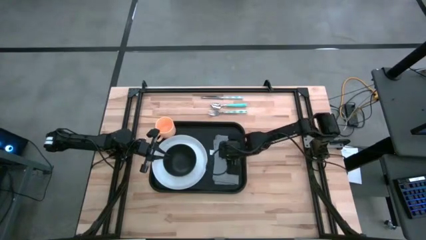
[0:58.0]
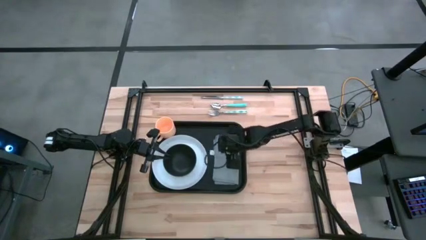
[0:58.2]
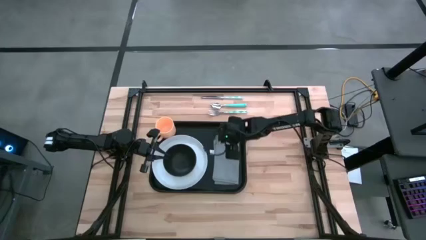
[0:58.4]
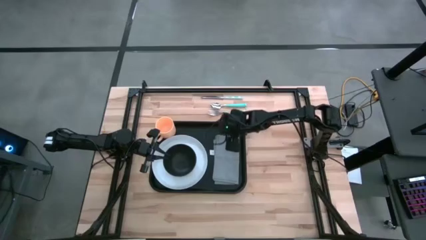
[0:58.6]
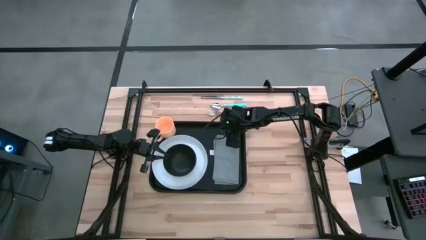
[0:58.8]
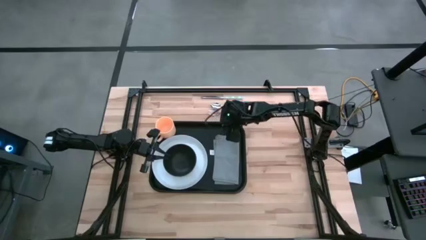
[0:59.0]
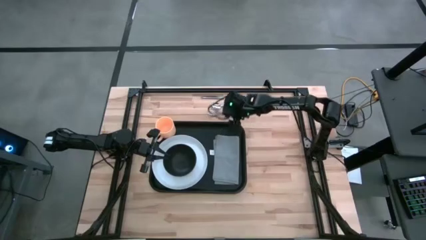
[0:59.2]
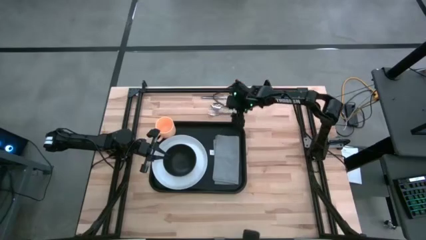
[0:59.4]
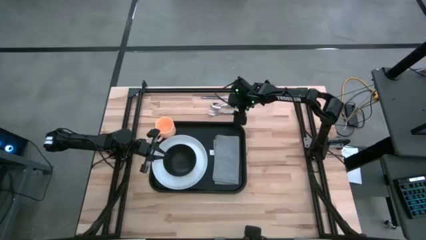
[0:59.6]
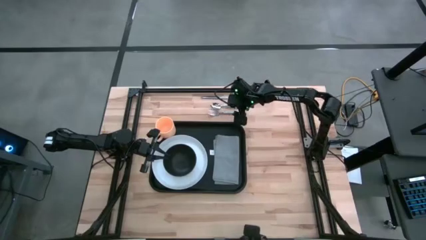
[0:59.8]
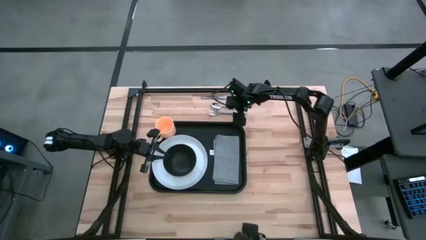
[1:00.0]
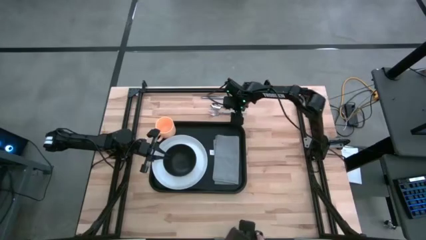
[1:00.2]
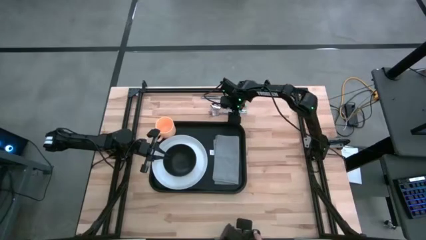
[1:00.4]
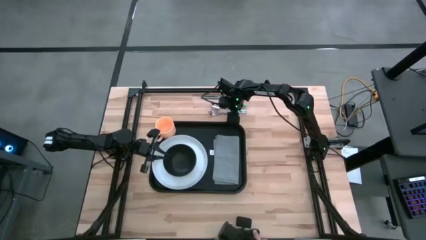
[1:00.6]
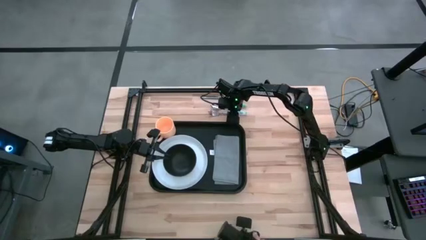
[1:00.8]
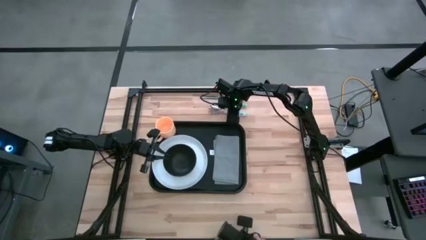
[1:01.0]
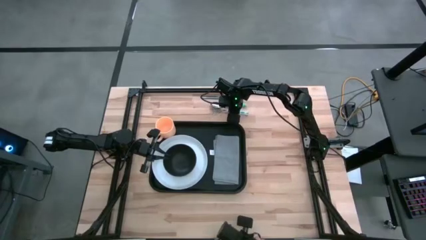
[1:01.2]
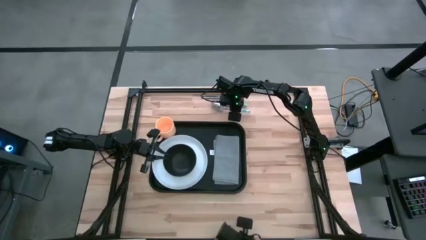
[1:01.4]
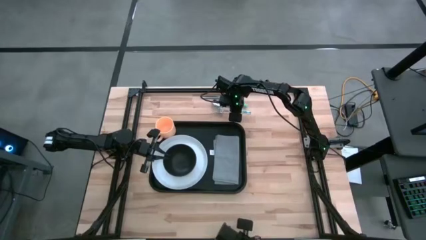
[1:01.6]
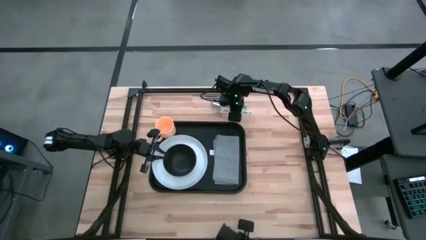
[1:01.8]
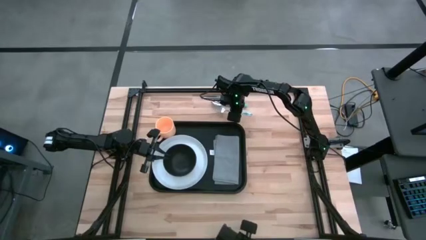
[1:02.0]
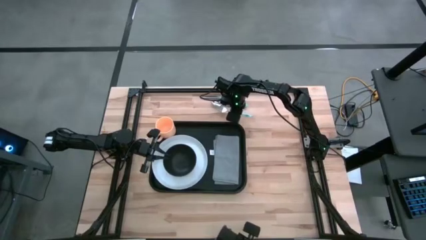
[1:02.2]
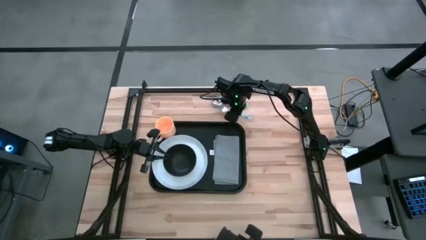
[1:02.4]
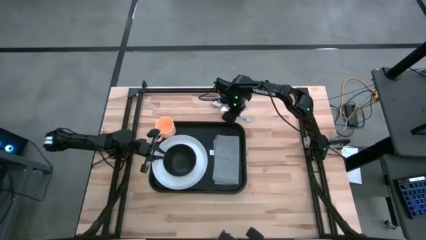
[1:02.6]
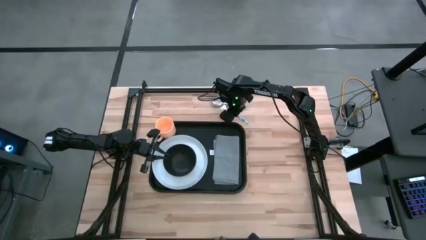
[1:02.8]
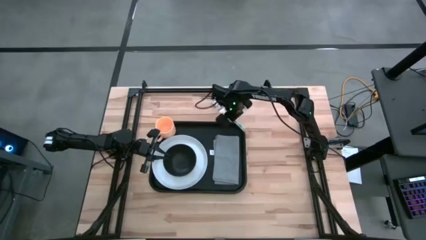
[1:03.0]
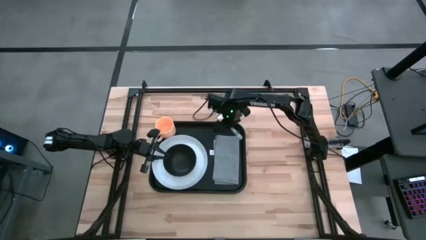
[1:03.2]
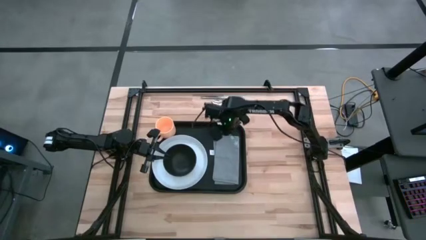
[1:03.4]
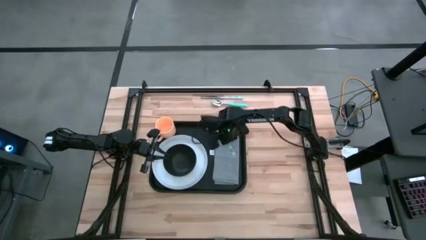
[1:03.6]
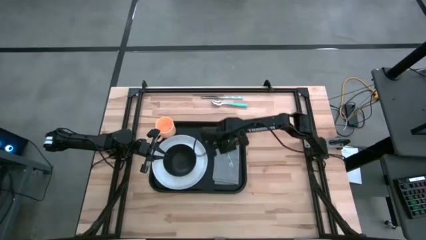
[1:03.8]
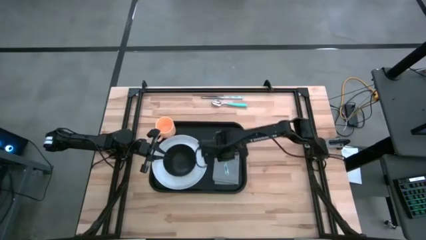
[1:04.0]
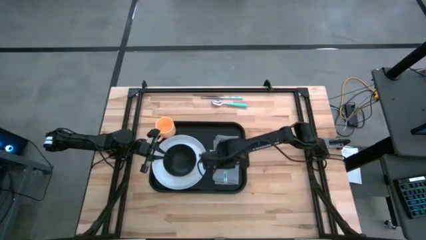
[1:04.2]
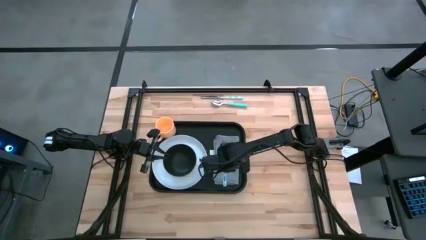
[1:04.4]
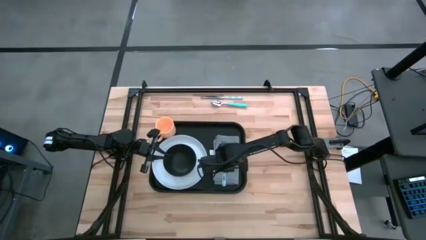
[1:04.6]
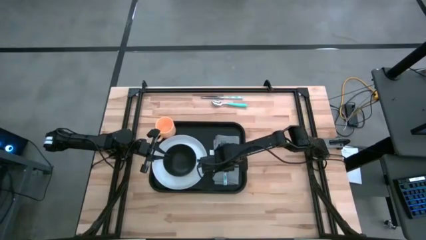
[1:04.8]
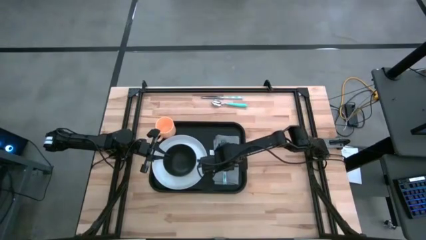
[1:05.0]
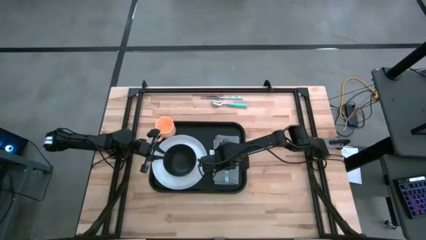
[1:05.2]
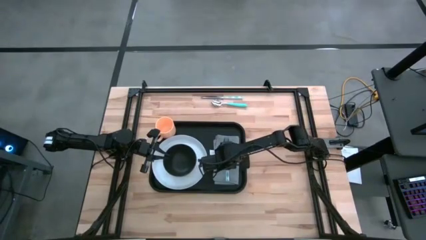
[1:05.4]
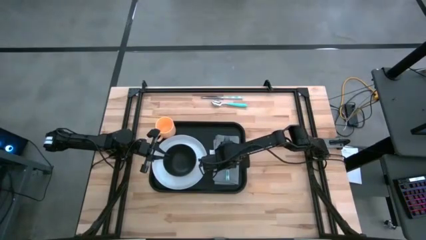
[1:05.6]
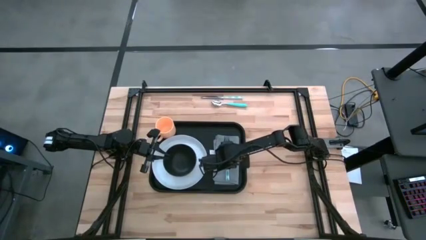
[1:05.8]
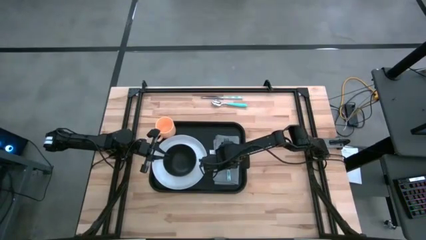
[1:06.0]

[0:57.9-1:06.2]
Task: Set up tray
Put the white fork on the gray napkin on the black tray

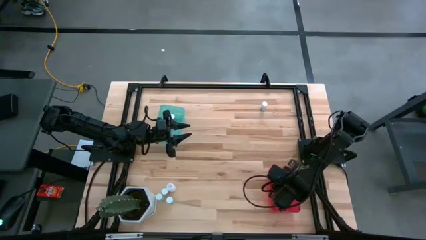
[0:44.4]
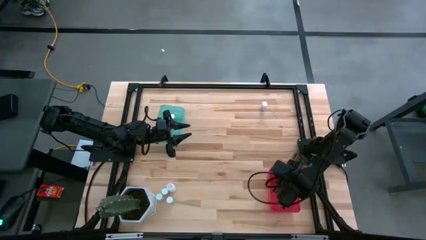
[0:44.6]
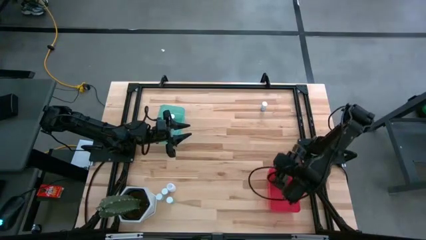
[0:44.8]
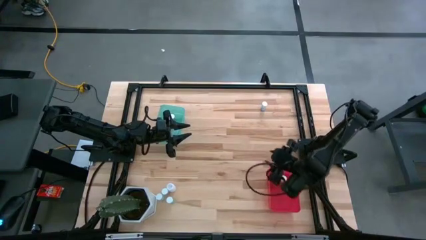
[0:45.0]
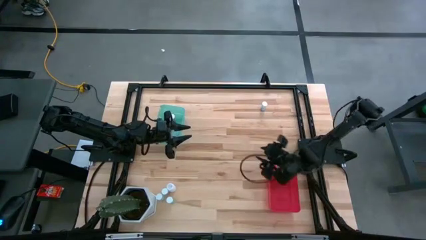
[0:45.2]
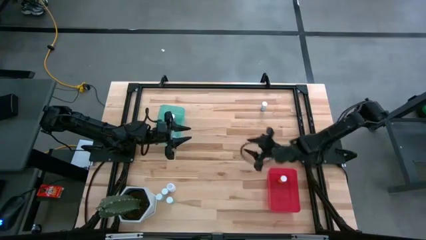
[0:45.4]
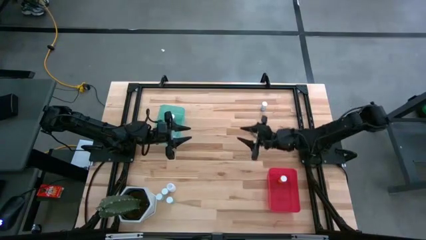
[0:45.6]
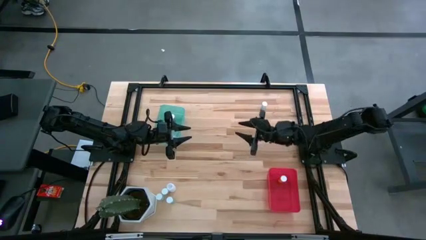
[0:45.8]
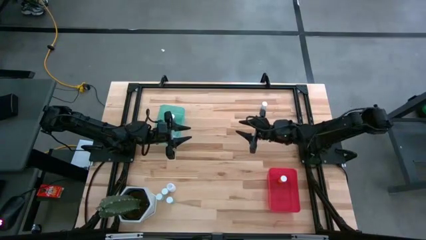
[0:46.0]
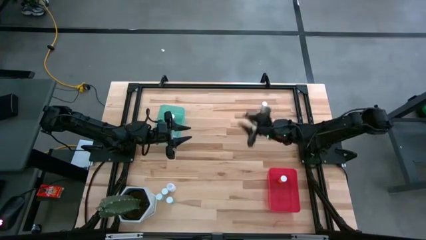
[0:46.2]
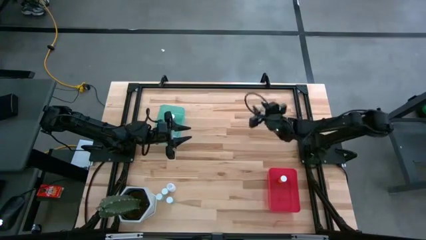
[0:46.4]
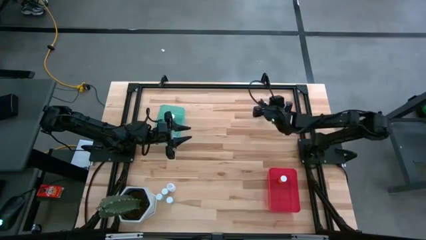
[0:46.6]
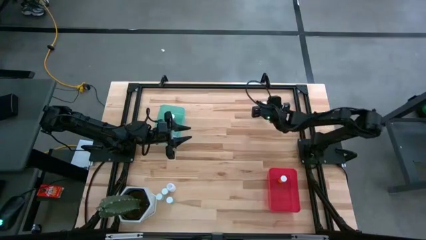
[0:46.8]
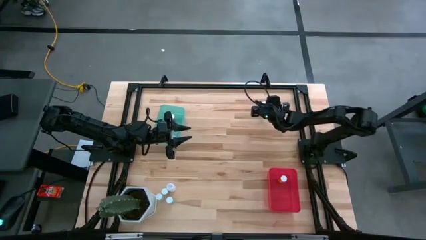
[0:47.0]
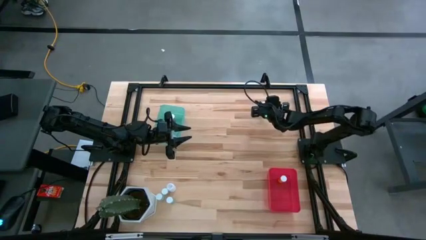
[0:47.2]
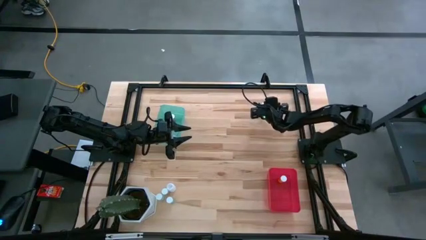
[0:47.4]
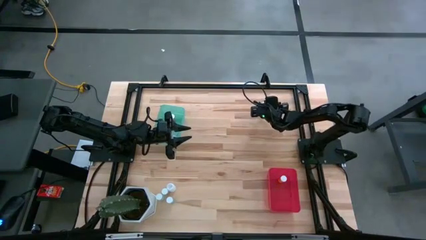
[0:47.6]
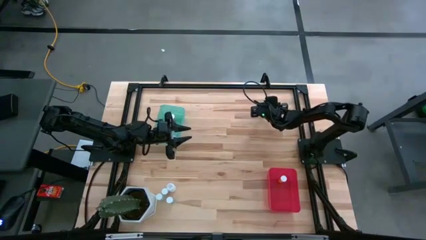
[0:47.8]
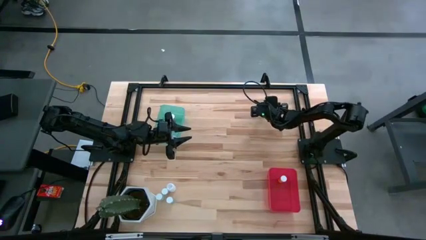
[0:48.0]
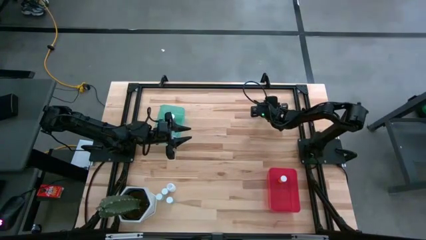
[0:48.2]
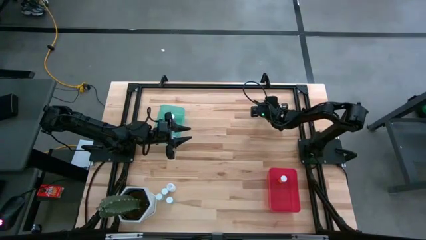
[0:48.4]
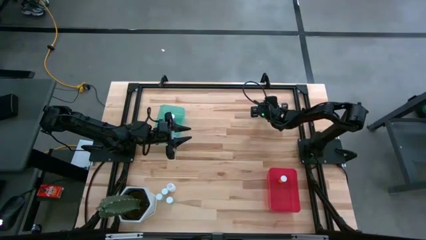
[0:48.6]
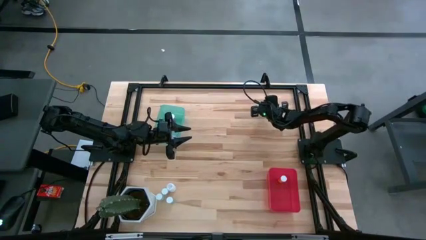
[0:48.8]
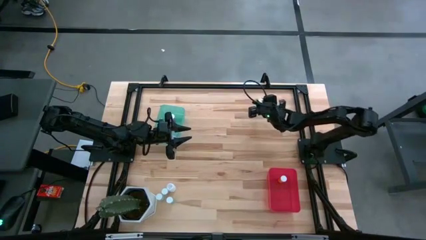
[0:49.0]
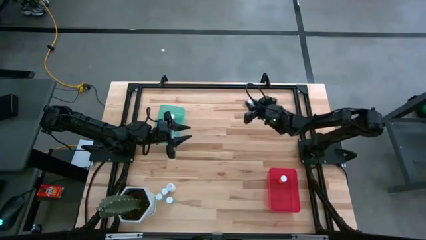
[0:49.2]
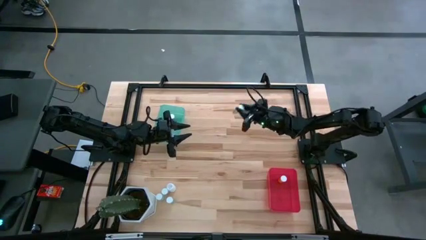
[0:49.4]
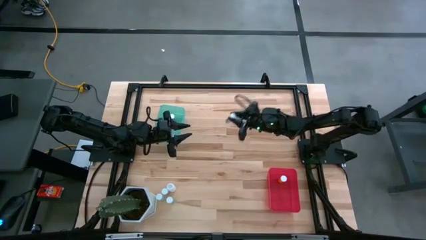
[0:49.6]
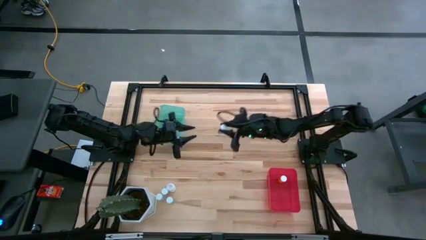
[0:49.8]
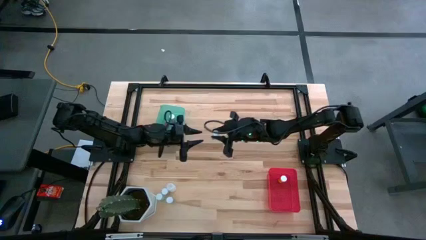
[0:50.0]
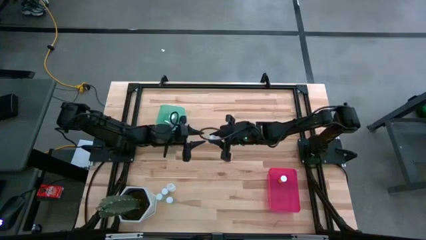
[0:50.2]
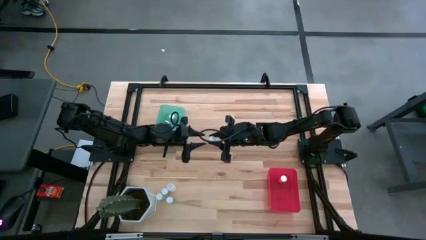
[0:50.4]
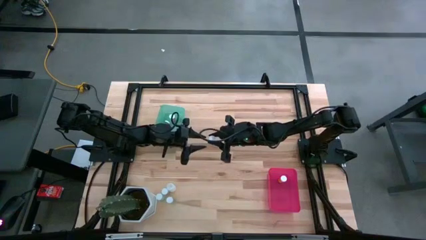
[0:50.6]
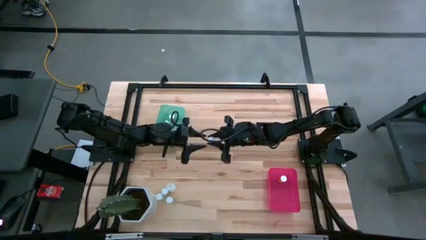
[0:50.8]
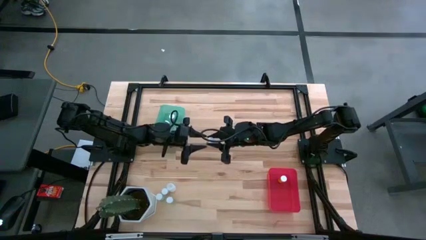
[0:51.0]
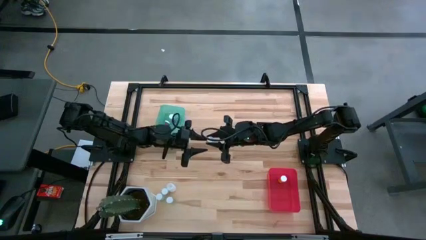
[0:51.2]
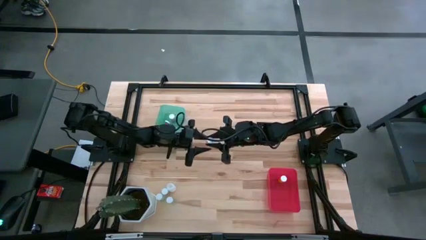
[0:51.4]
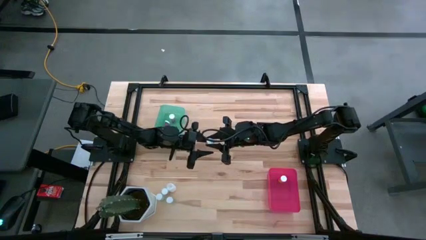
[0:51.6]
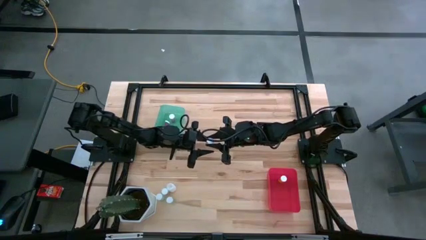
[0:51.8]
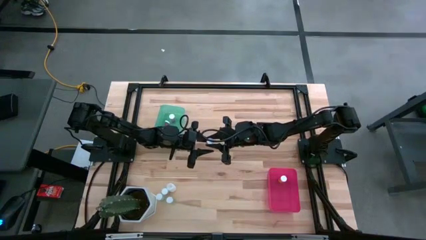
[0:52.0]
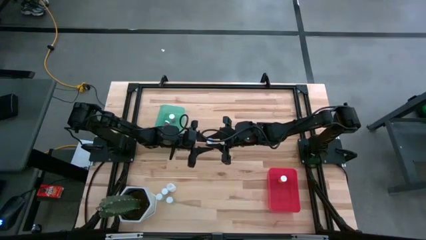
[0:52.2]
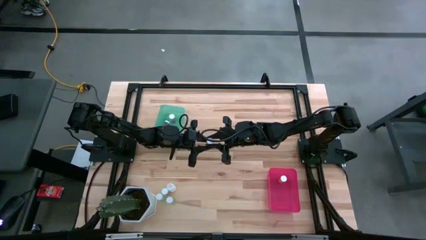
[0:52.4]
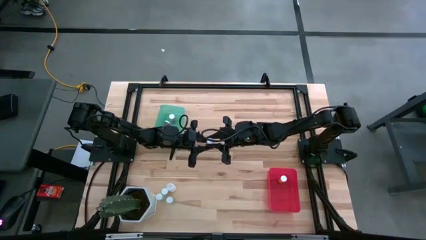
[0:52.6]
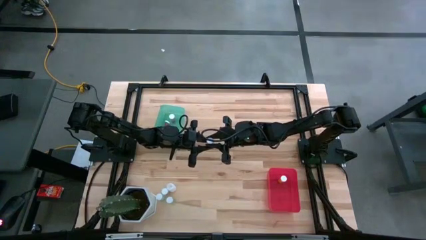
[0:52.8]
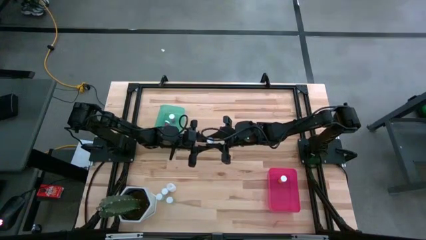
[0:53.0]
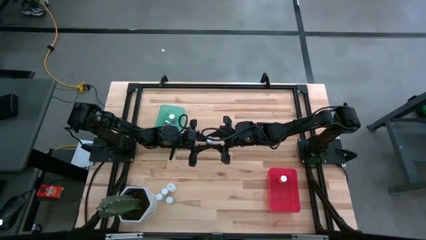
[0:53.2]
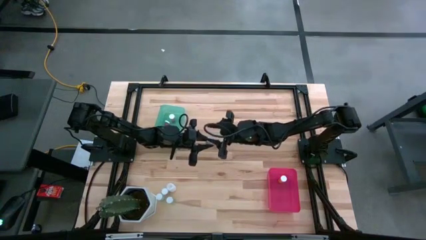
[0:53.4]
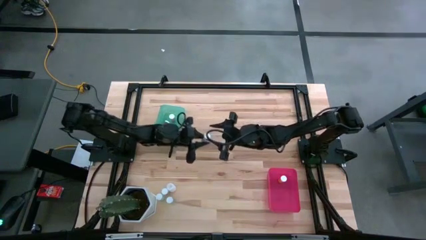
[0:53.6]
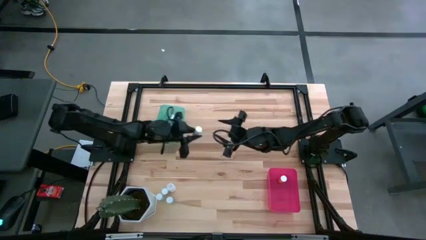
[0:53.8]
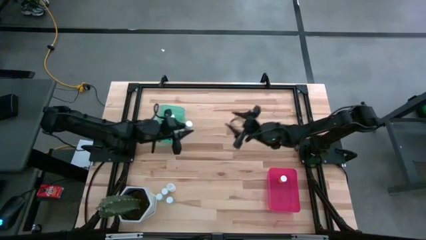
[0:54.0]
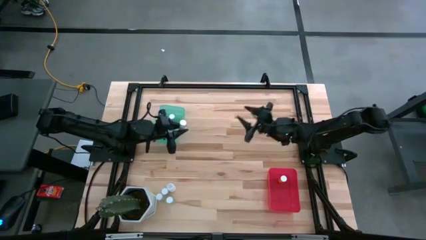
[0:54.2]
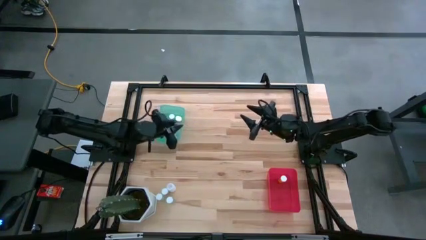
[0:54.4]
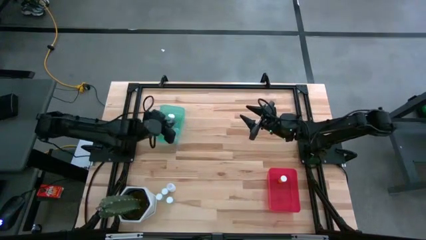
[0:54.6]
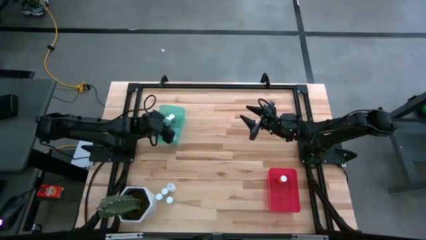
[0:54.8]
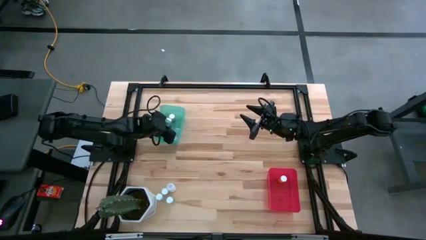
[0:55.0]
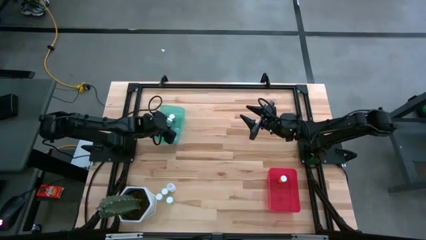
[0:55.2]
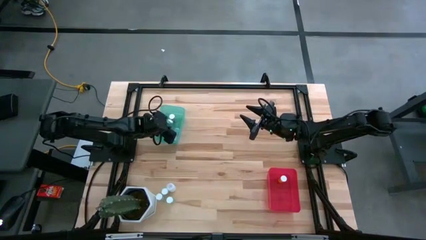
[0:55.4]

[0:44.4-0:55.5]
Task: Pick and place medicine bottles into bin by pill shape (circle, oval)
Put the green capsule bottle into the blue bin
